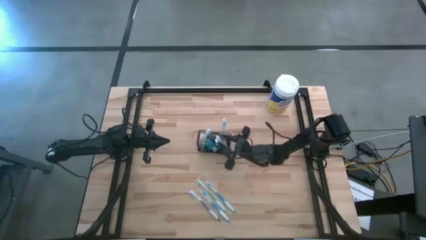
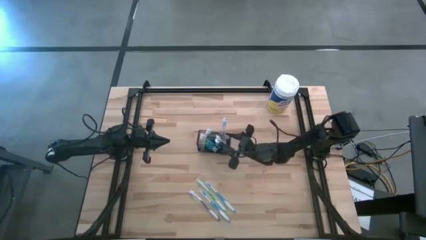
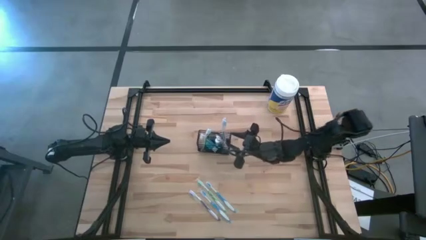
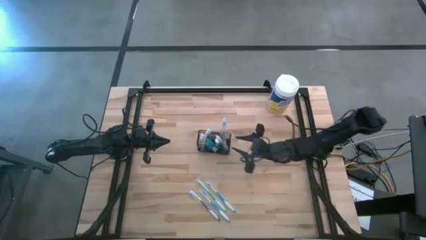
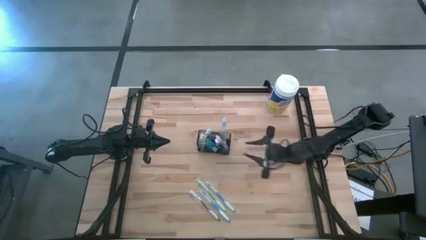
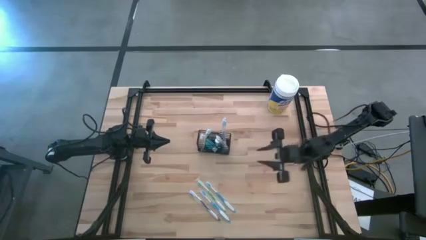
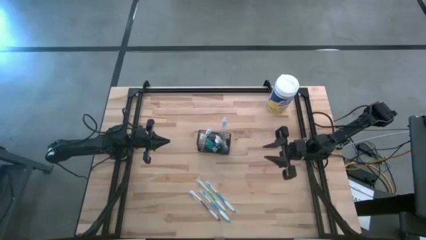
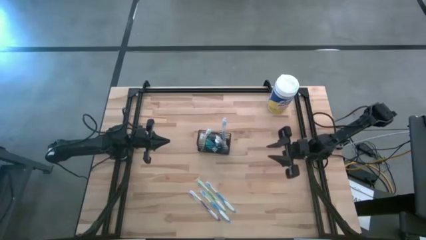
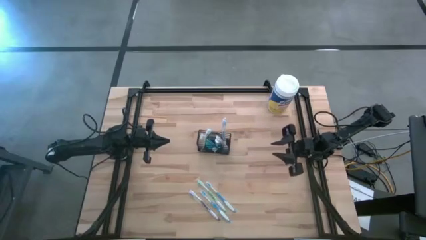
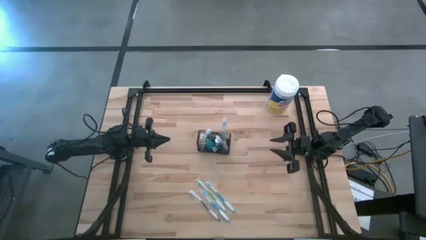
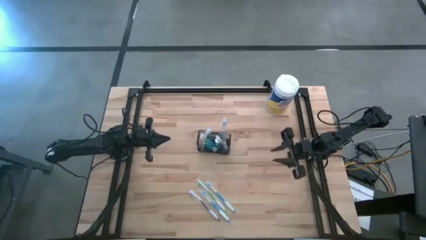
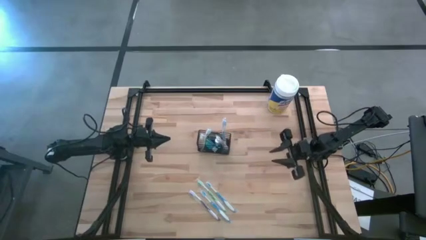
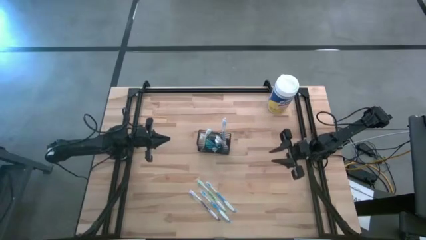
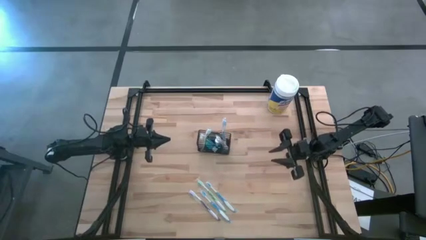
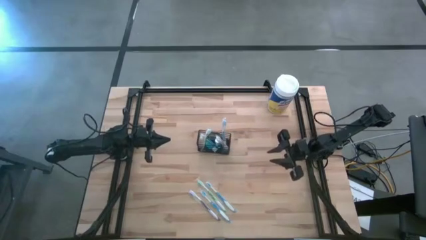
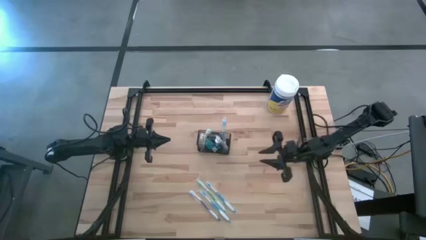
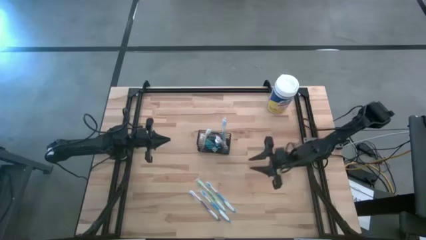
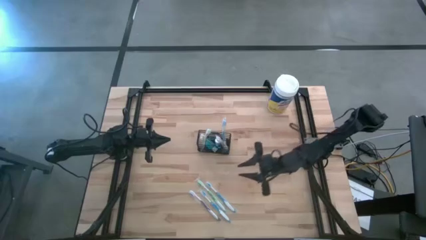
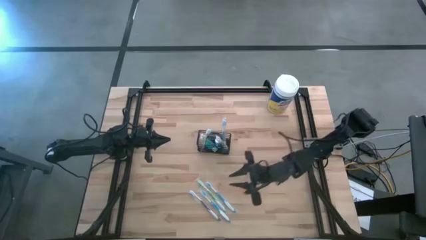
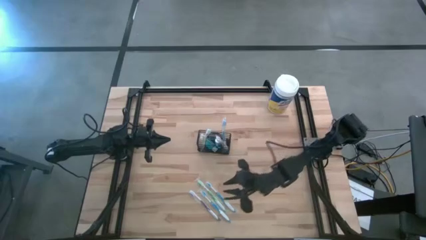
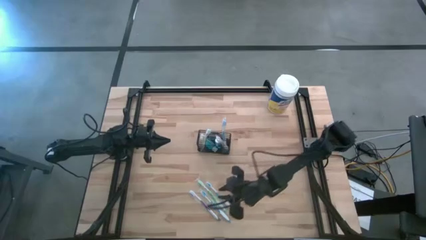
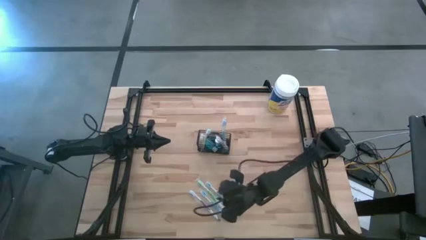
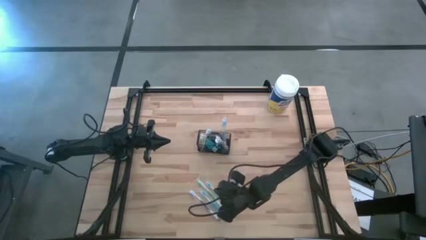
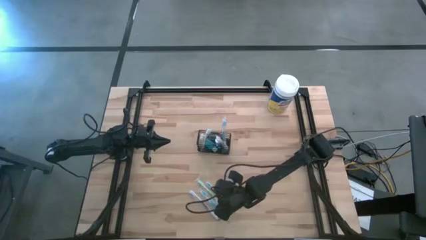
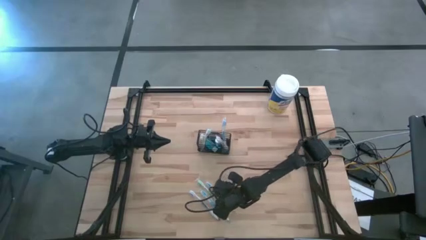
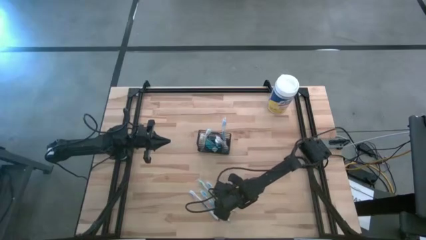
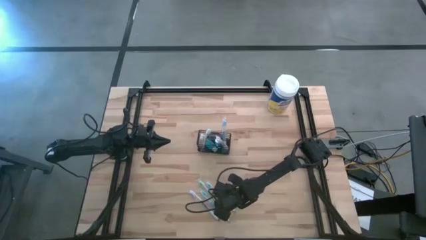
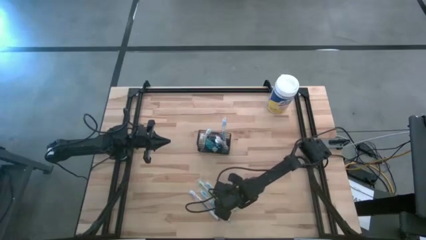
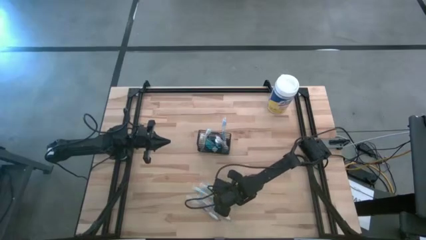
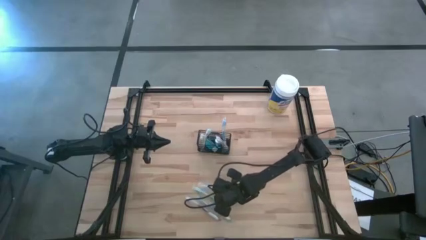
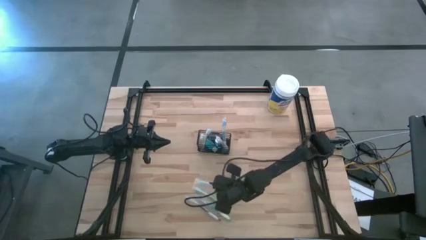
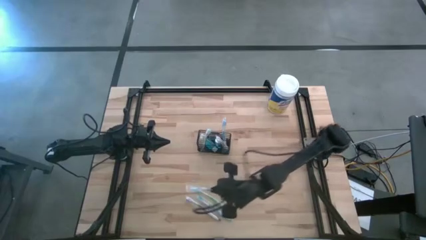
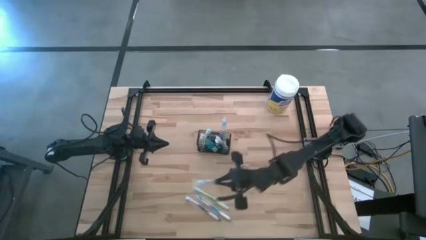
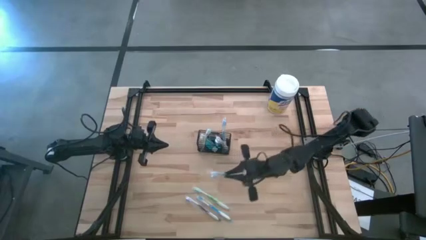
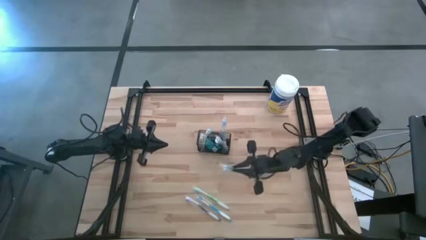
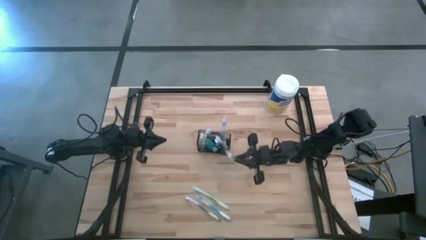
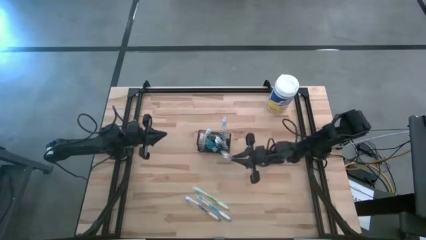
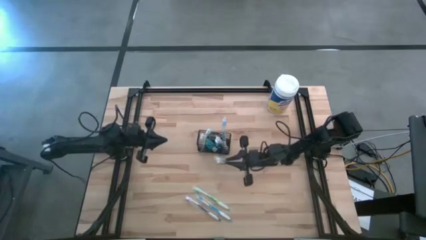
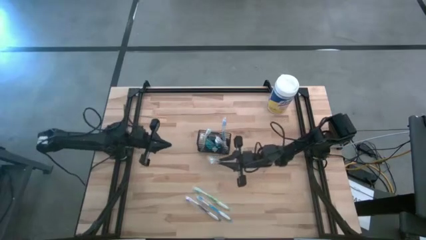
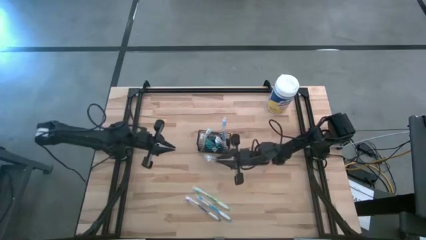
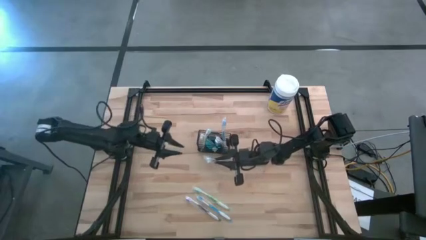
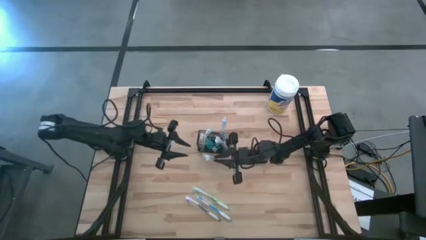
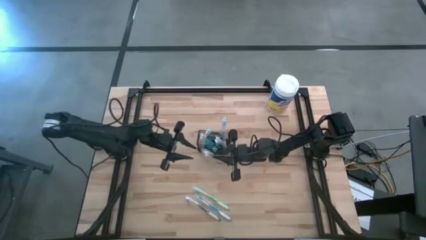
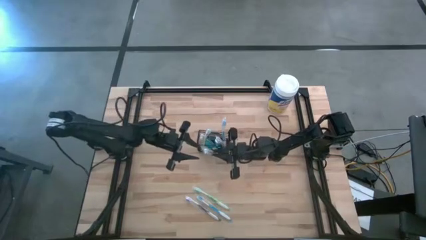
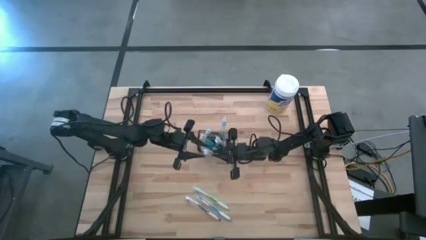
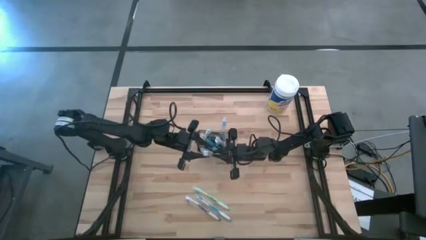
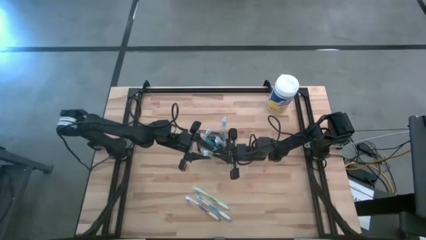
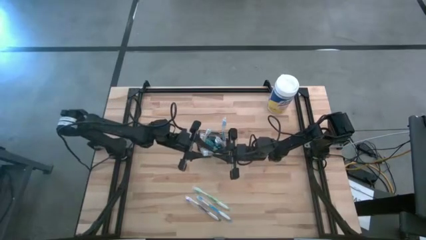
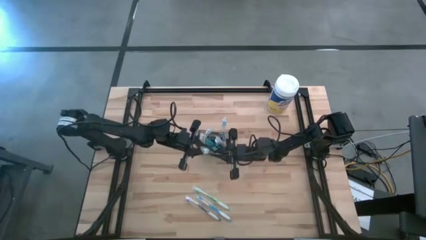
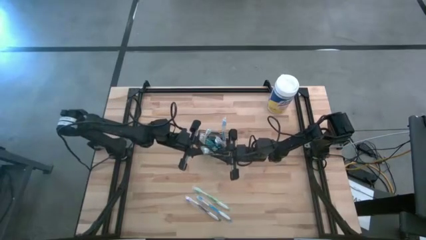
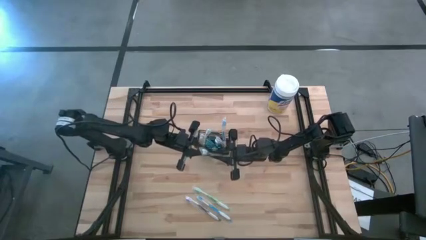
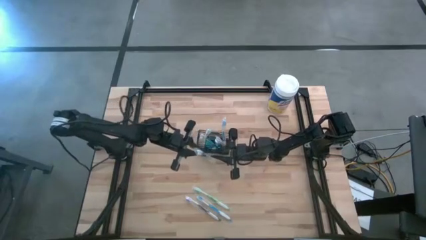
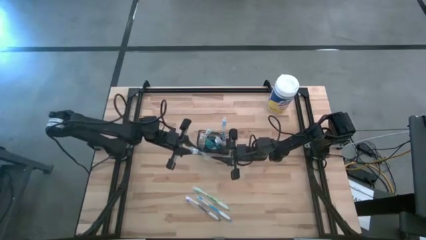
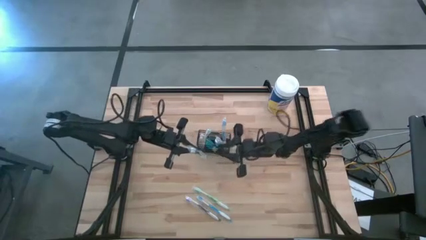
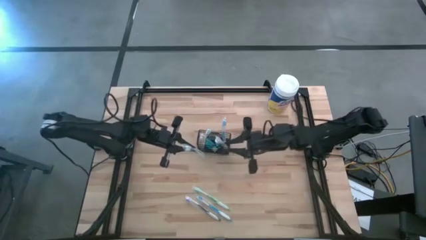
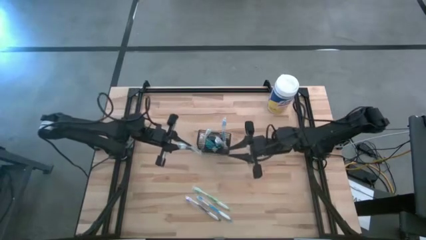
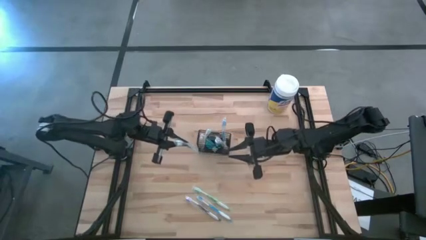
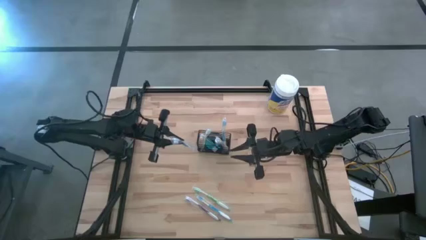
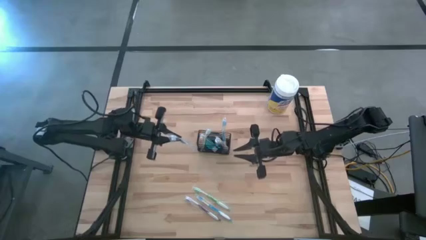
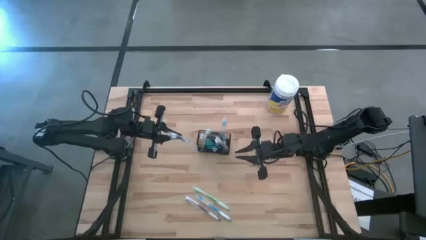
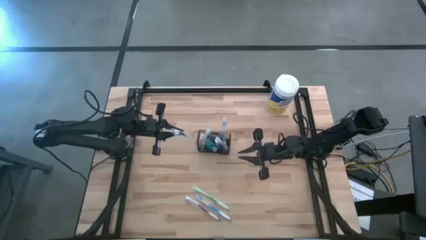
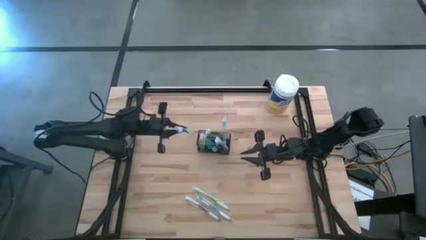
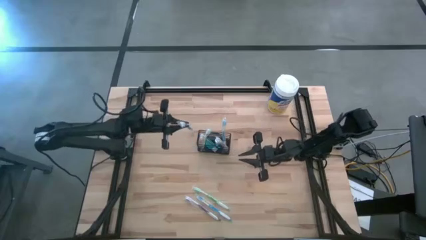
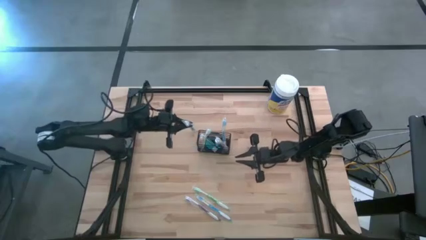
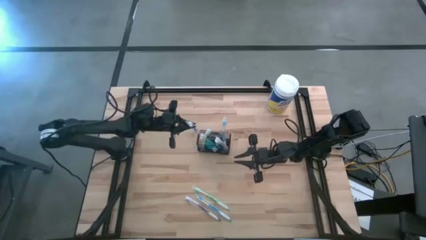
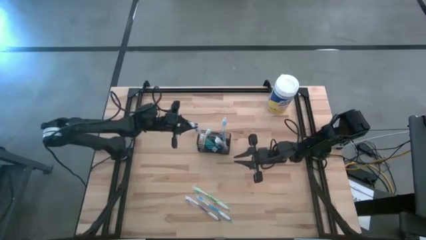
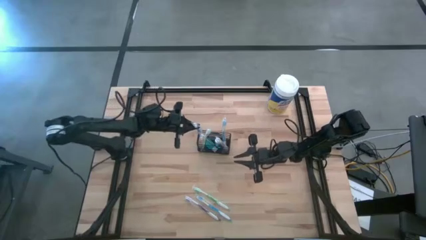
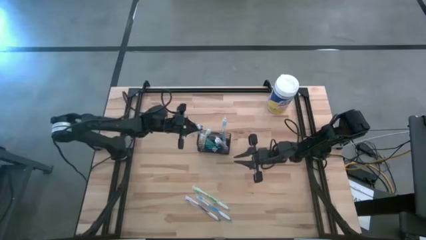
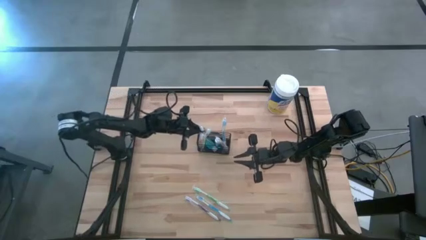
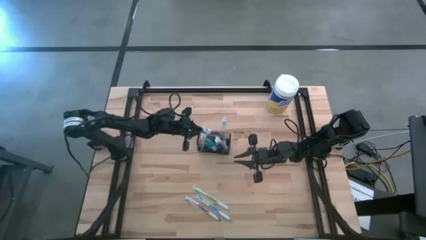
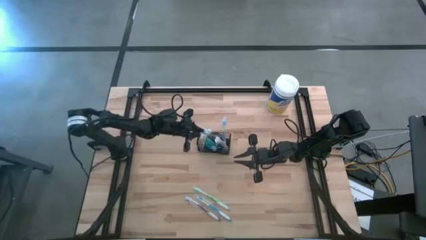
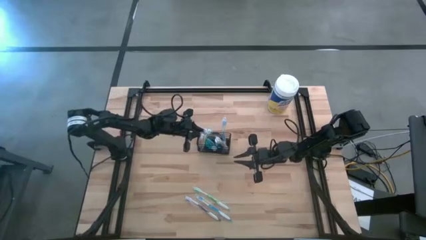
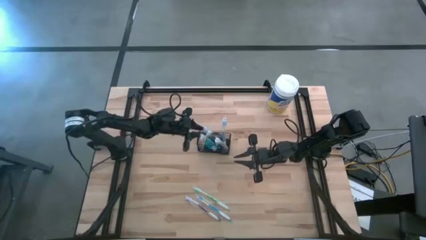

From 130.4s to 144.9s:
Task: Pick & Place toothbrushing station
Put the right blue toothbrush into the black wire organizer

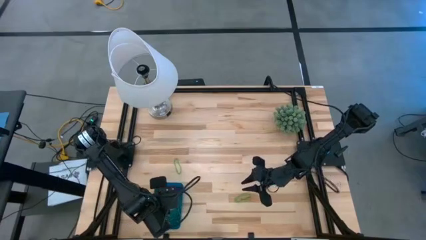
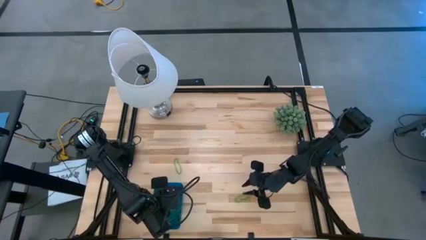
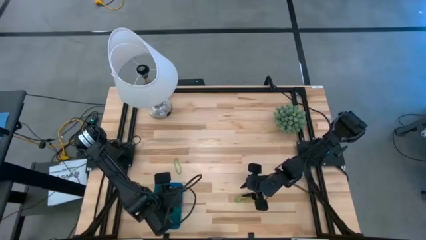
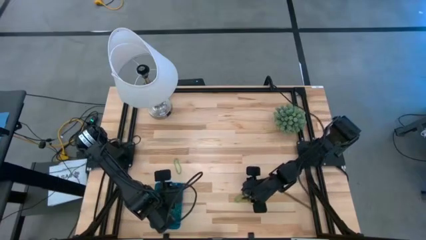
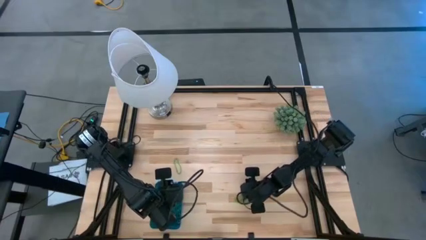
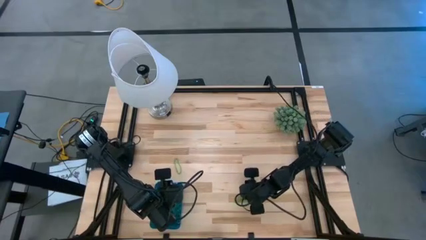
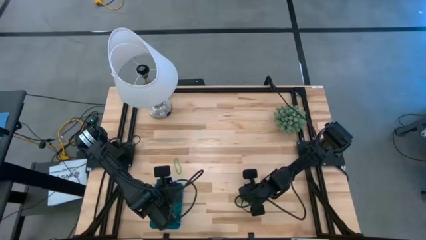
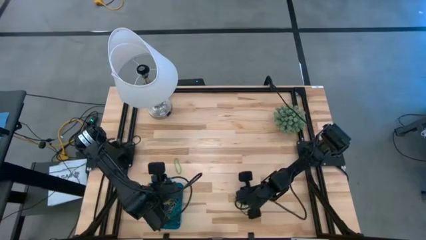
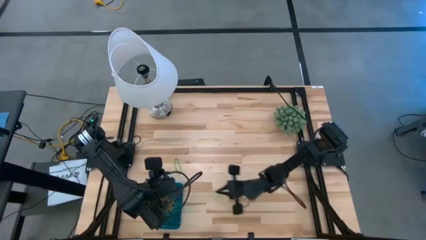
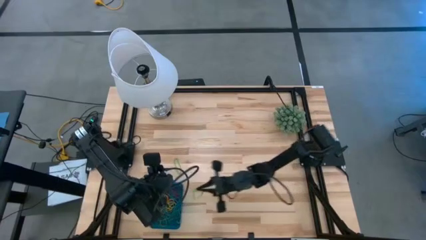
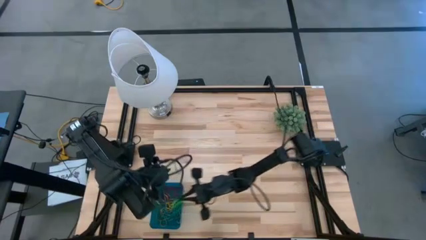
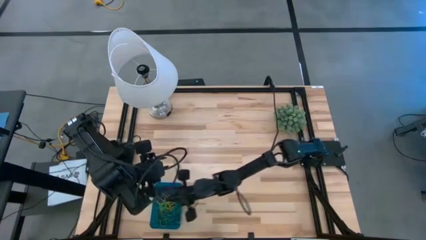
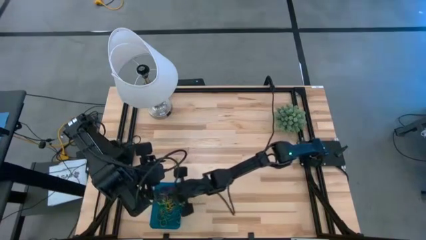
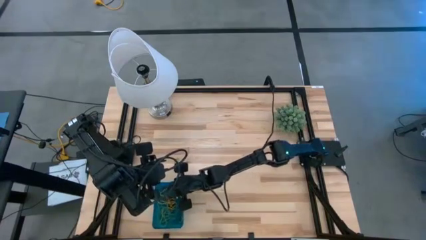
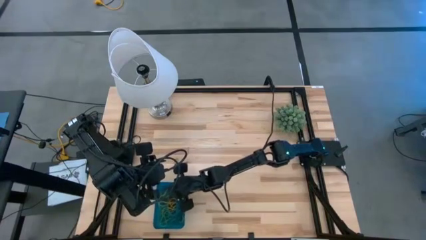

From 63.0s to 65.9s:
Task: Pick and place items into bin
Put the bottom green rubber band into the blue bin

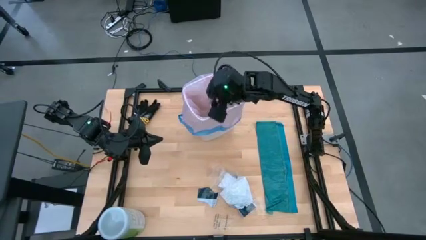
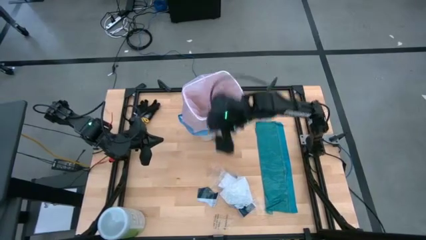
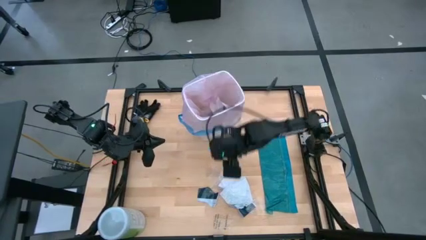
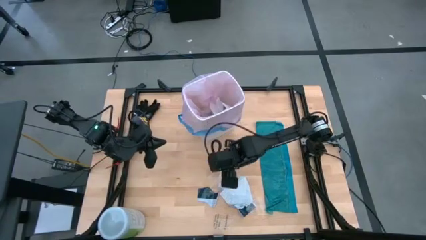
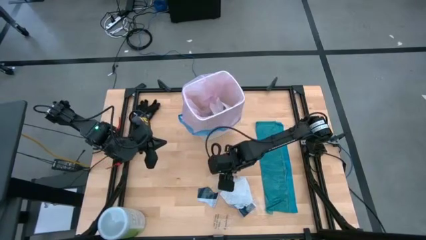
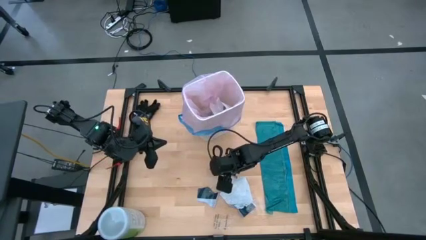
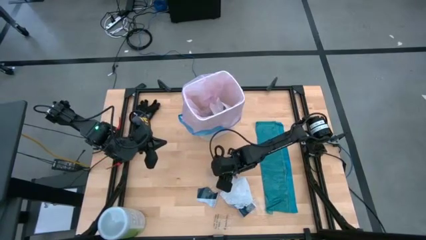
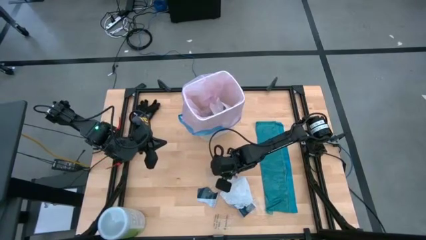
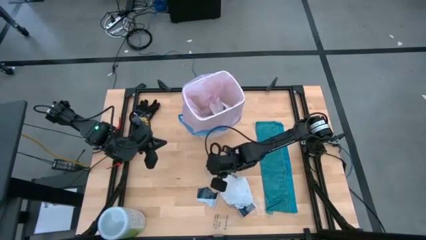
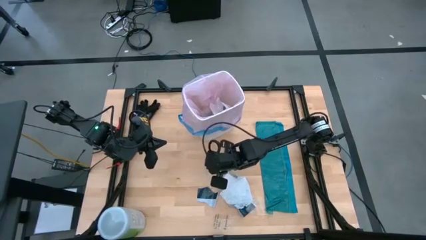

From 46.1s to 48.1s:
Task: place trash/remove bag and relplace
Put the transparent plastic into the white trash bin
